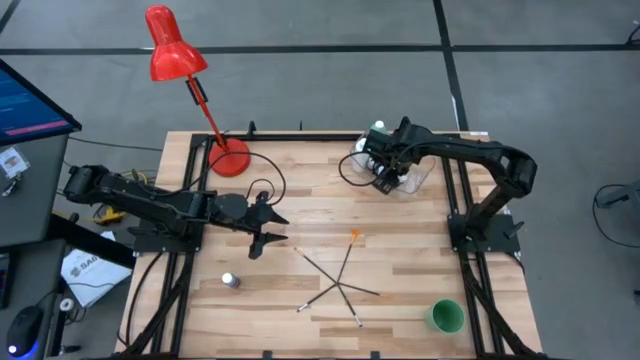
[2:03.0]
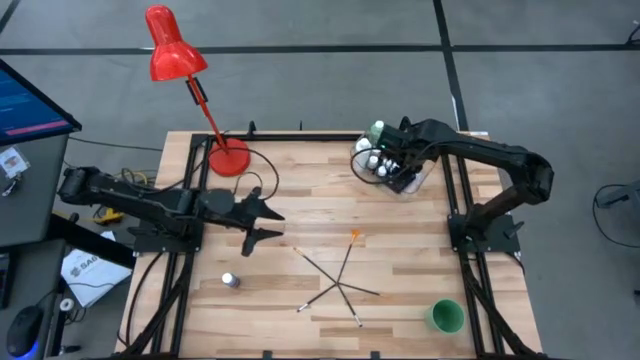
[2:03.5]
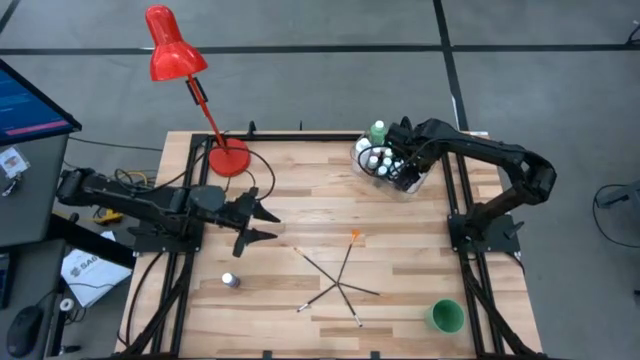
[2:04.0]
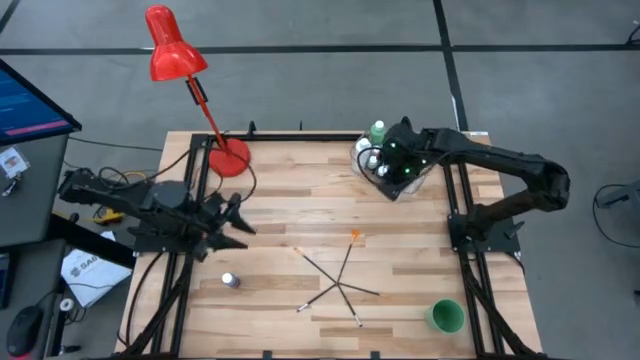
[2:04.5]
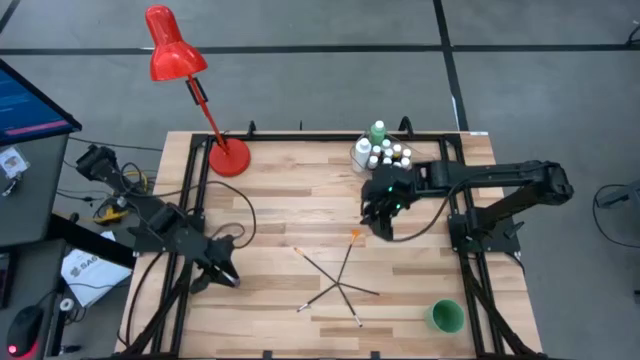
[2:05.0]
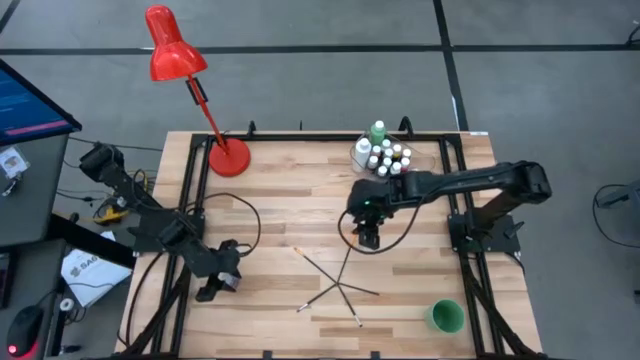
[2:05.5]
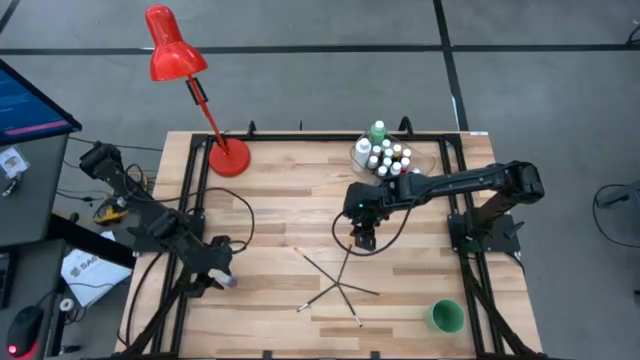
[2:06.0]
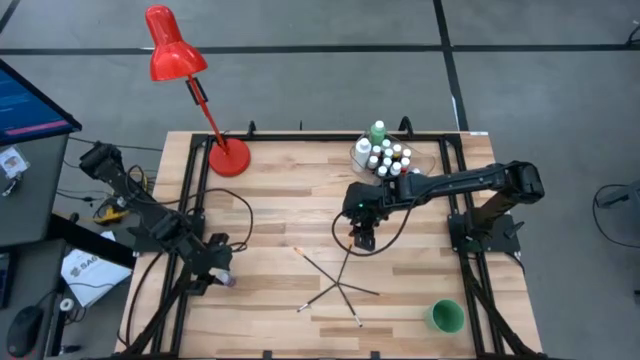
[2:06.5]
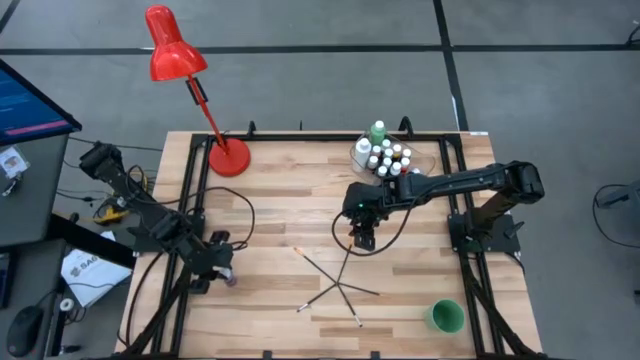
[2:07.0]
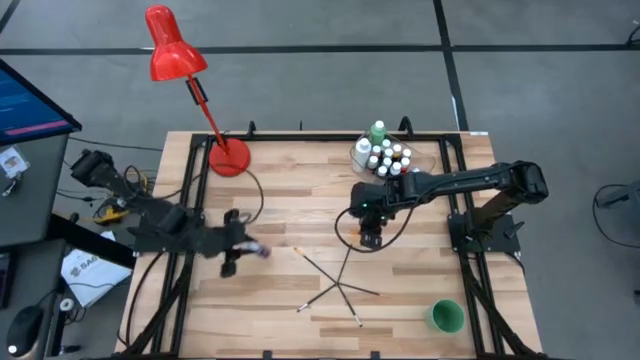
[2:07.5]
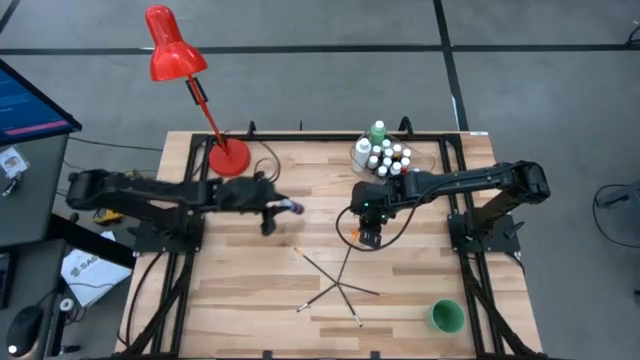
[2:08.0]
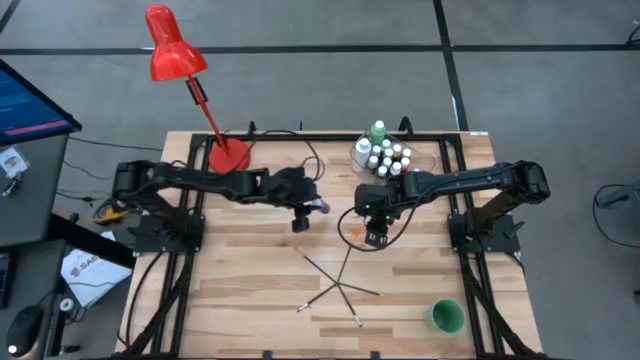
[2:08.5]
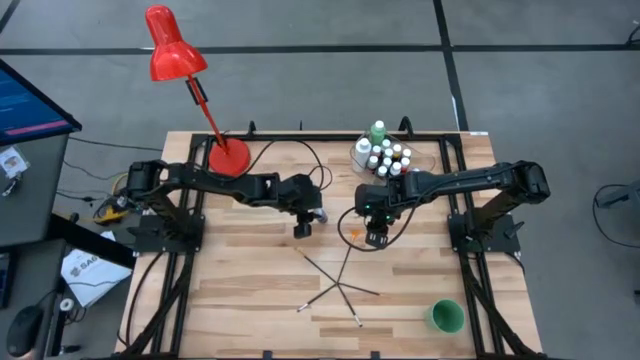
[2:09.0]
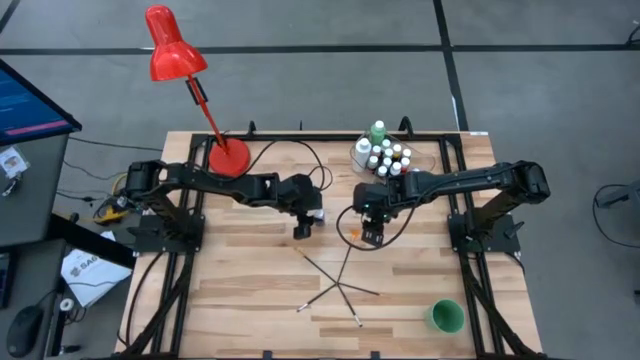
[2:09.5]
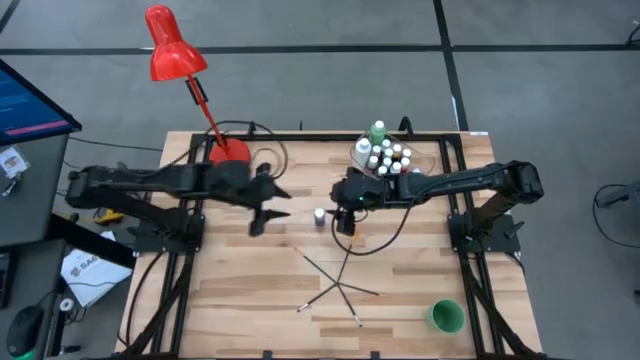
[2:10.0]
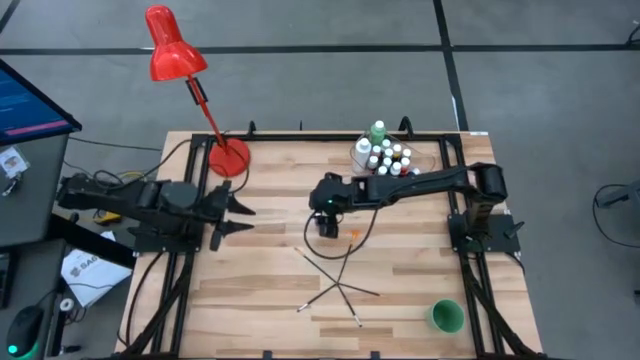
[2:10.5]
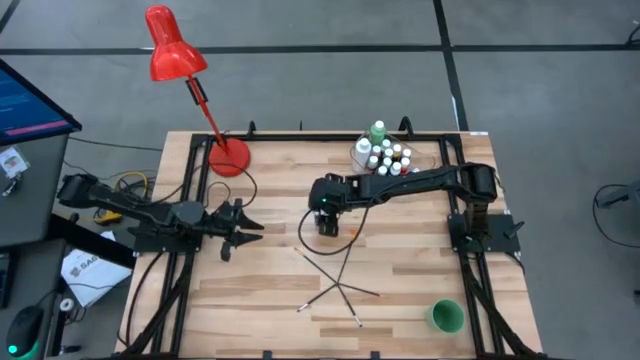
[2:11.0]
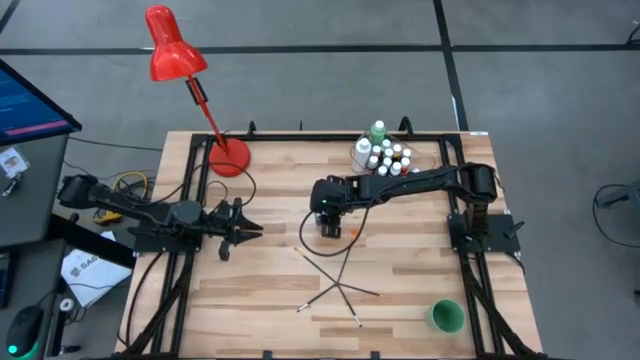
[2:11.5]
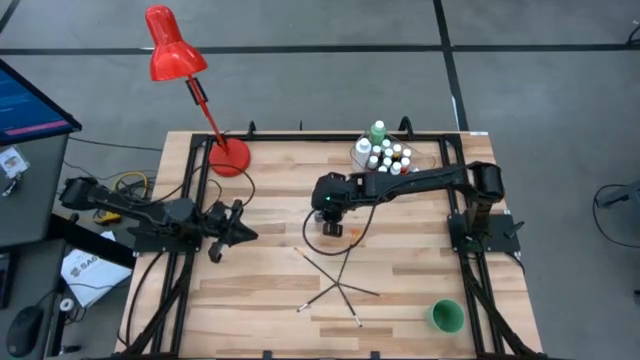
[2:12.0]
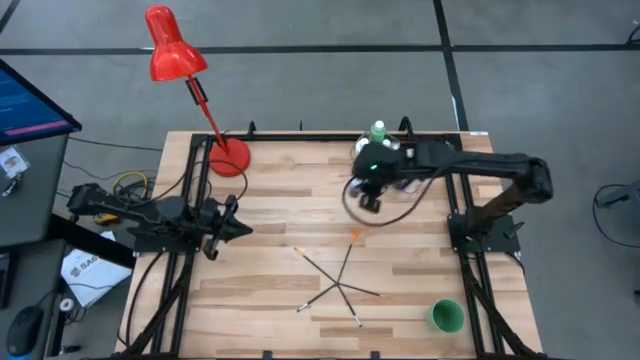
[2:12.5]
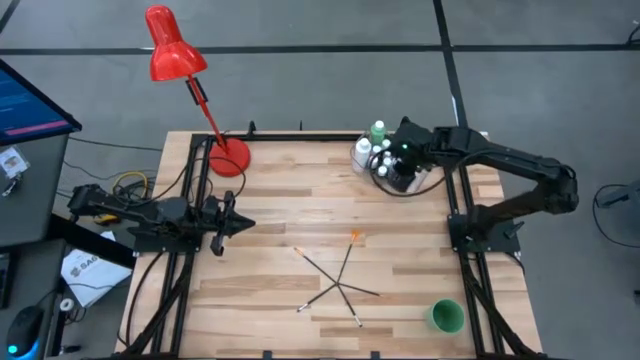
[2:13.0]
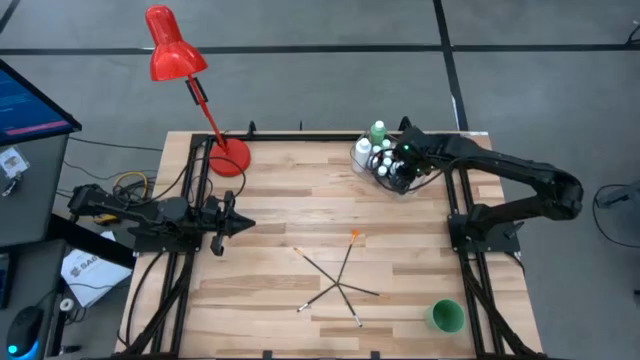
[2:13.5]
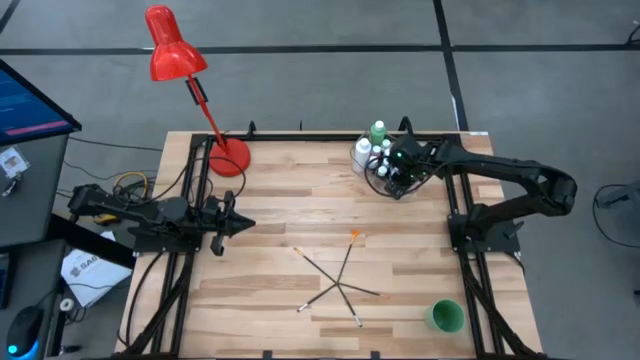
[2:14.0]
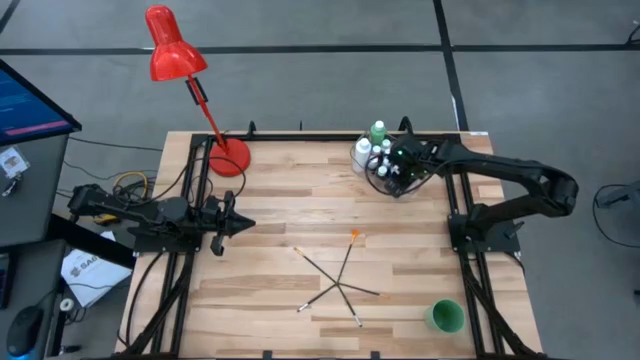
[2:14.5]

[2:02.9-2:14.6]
Task: Pick & Place Paint Supplies
Put the small violet paint bottle into the transparent bin

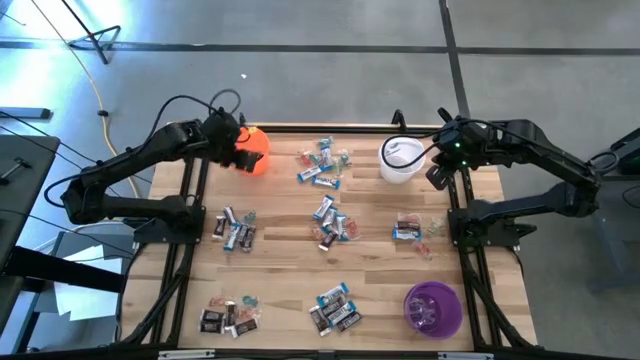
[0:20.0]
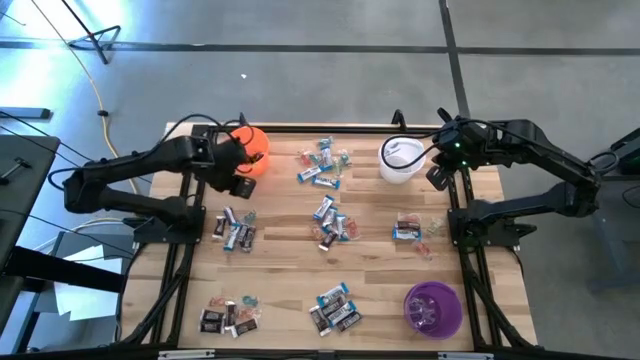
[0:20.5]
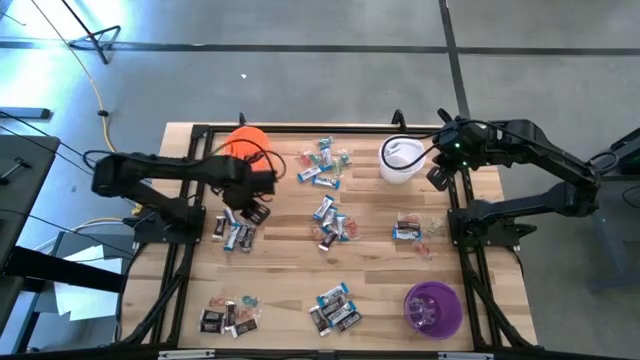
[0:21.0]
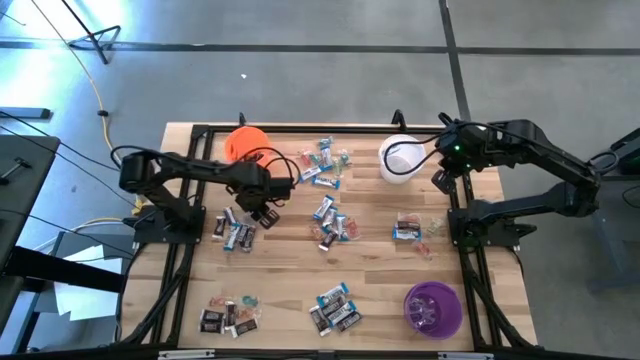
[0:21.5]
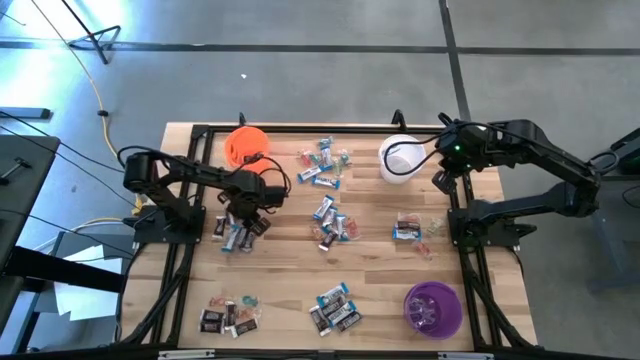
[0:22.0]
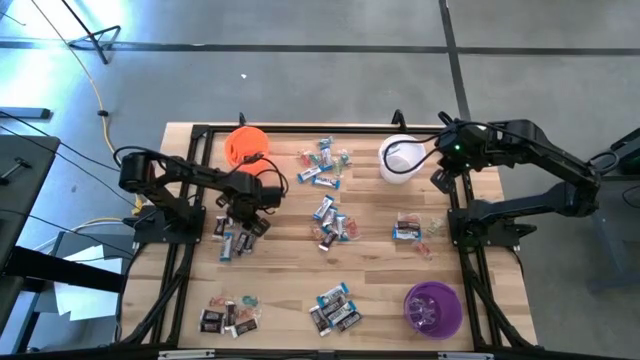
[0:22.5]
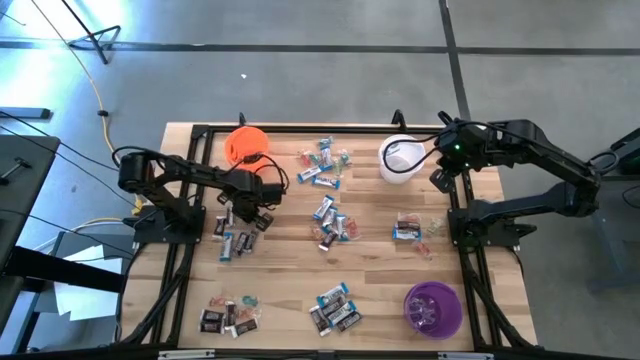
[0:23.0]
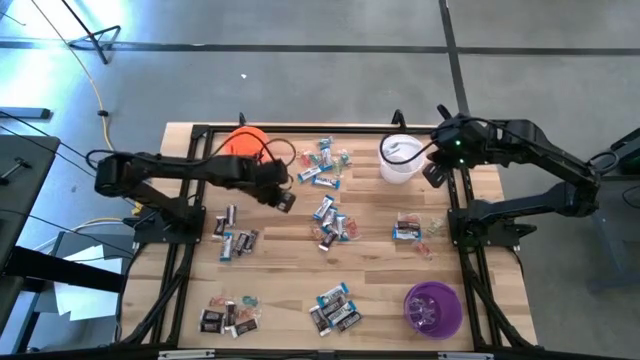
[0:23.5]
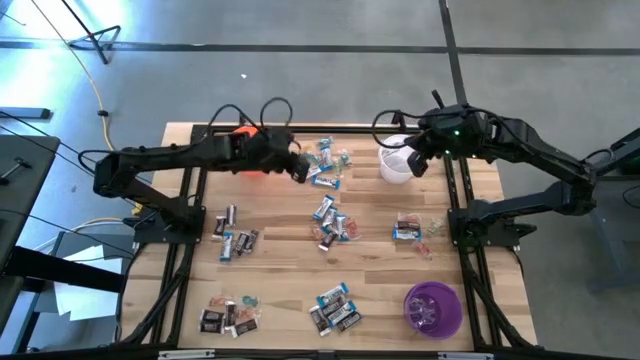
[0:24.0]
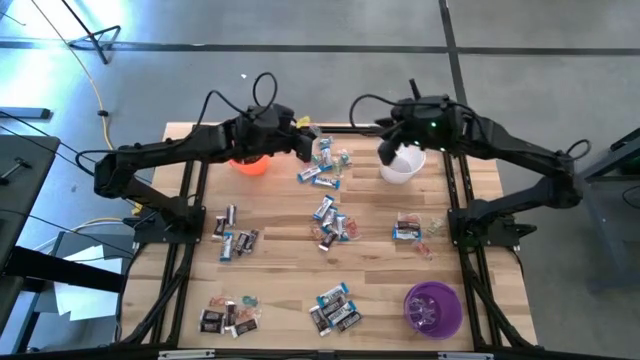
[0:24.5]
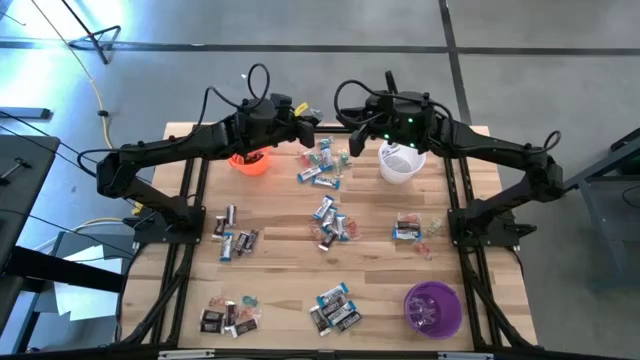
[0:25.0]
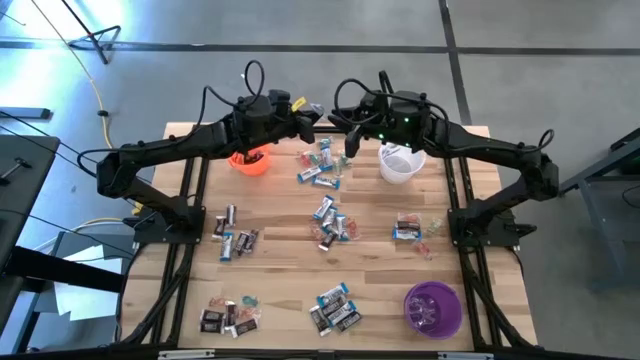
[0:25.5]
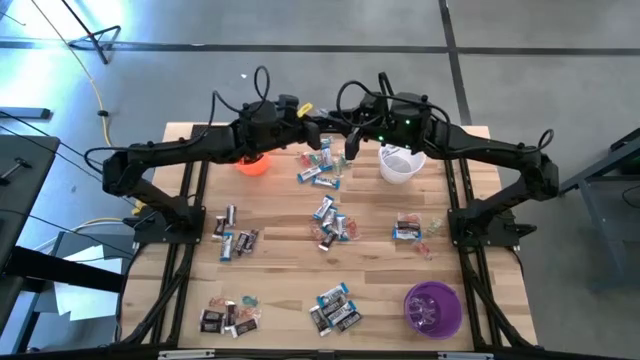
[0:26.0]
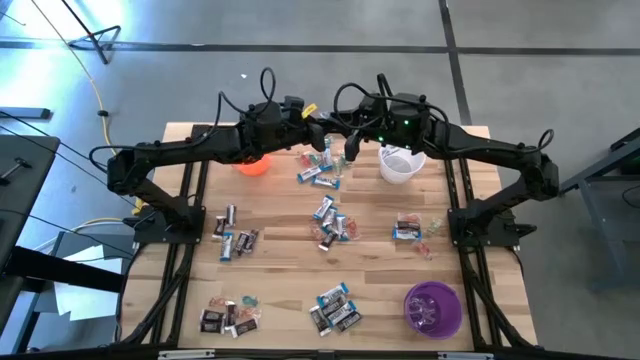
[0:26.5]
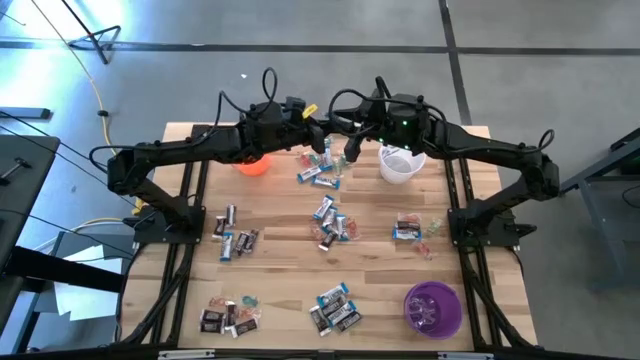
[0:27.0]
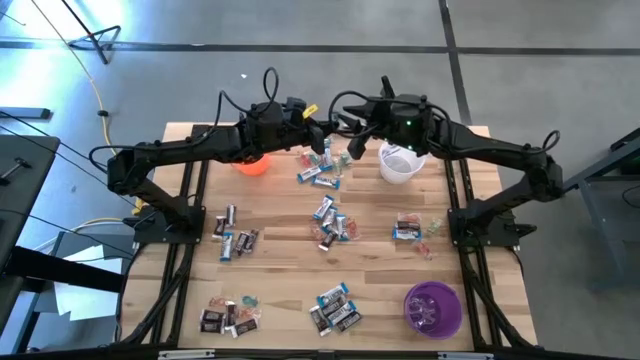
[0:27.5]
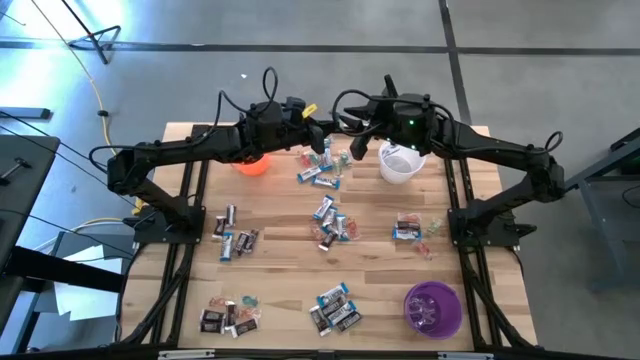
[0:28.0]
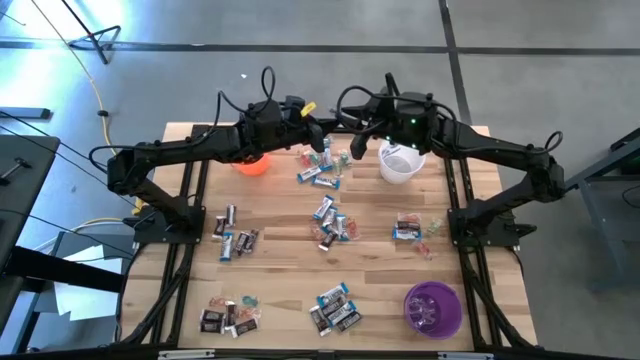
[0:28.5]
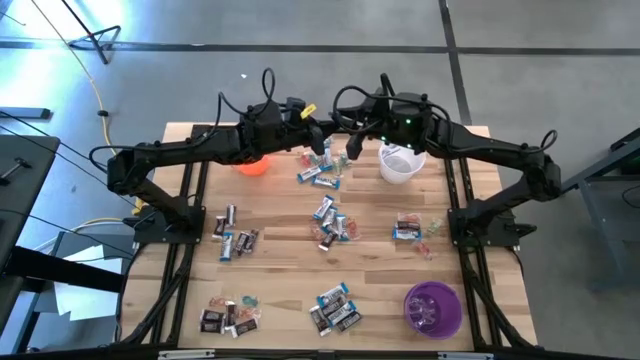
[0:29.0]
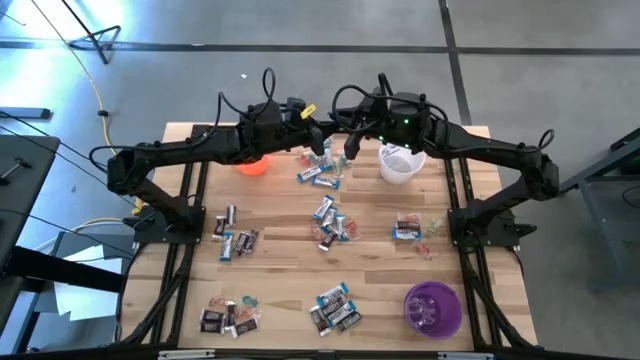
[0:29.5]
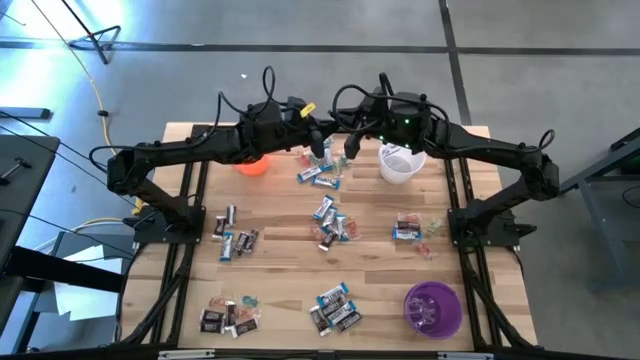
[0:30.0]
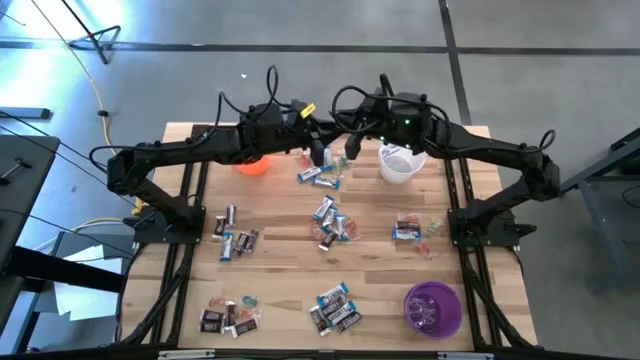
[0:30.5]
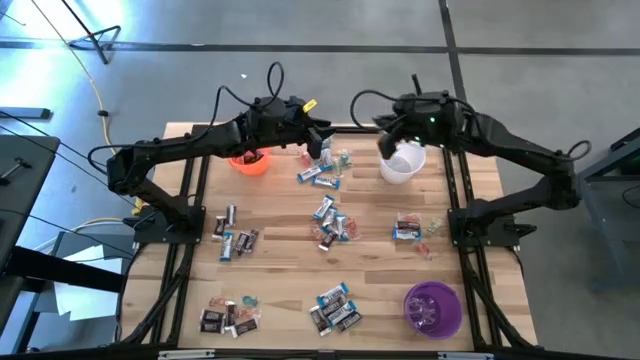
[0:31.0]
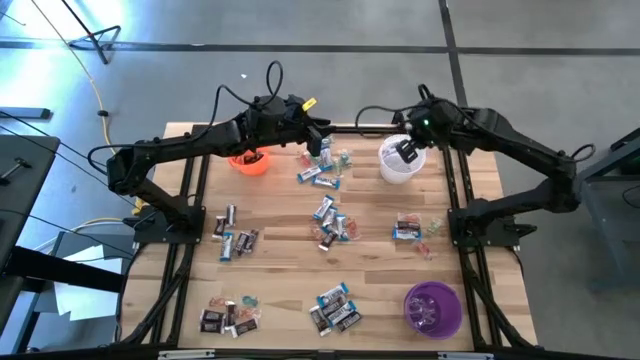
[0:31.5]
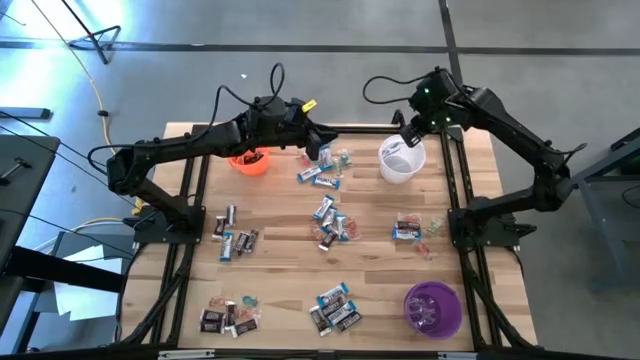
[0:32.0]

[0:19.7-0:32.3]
Task: Sort candy
Put the blue gummy into the white bucket
